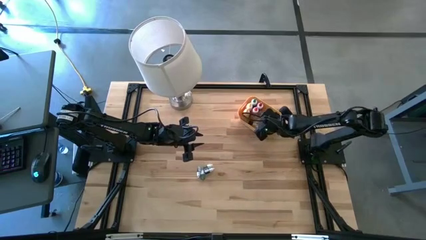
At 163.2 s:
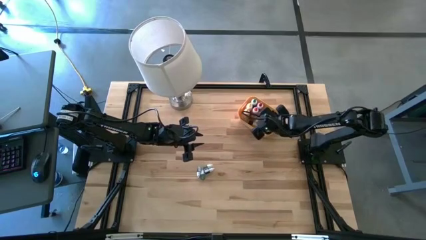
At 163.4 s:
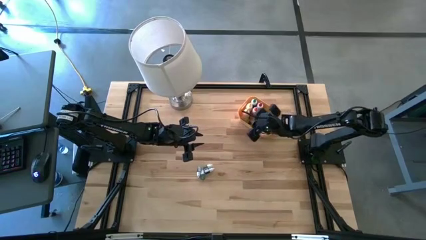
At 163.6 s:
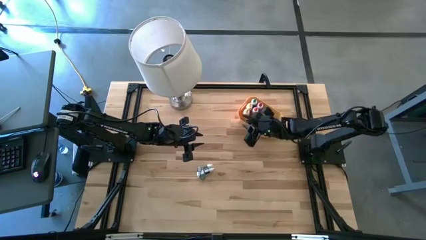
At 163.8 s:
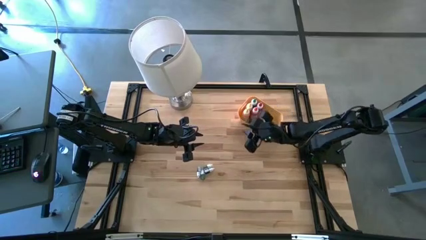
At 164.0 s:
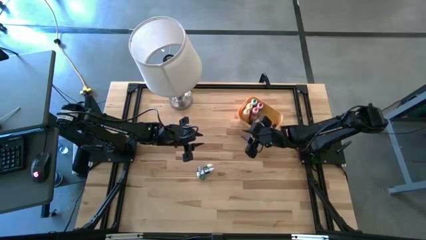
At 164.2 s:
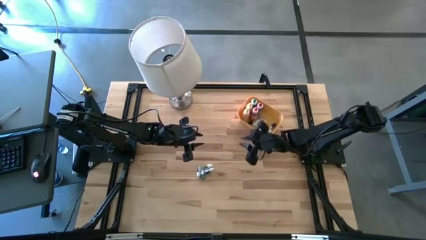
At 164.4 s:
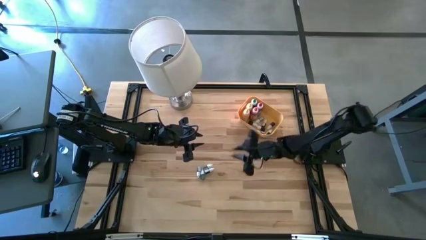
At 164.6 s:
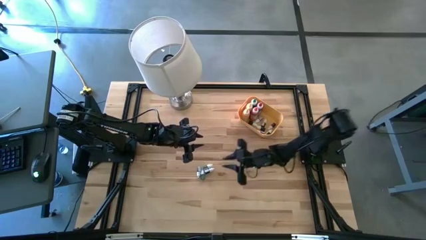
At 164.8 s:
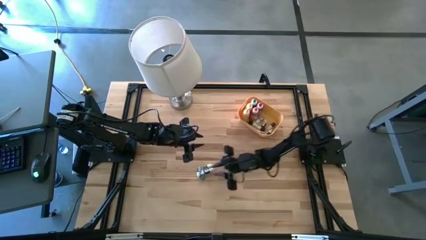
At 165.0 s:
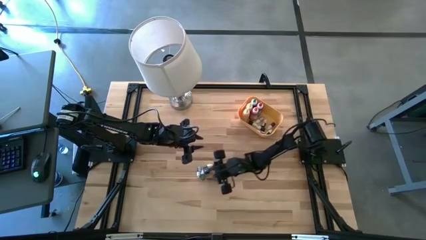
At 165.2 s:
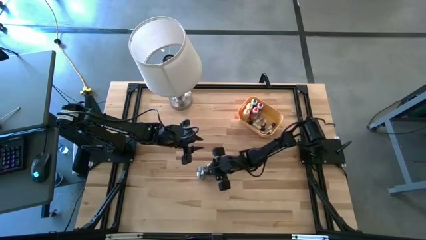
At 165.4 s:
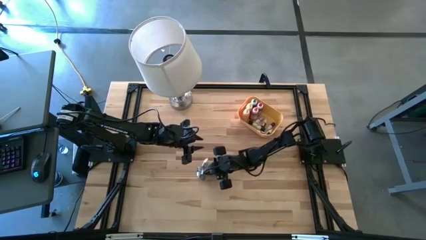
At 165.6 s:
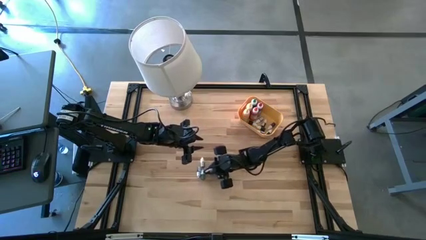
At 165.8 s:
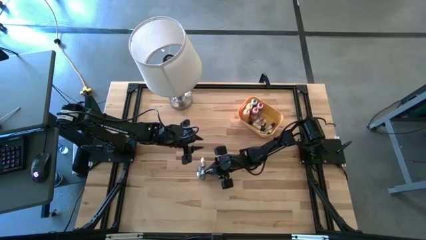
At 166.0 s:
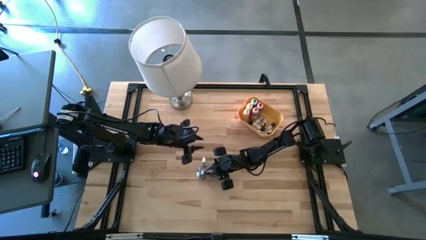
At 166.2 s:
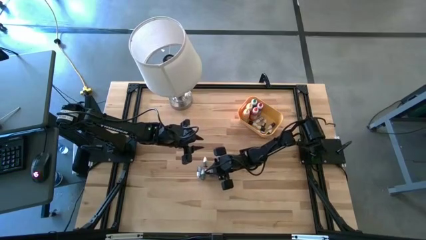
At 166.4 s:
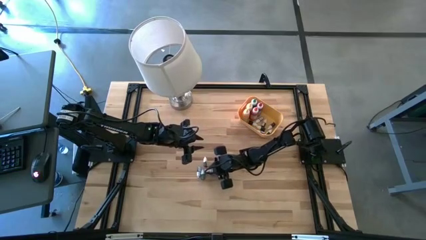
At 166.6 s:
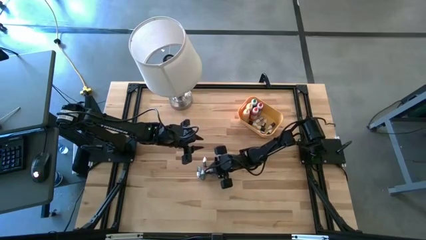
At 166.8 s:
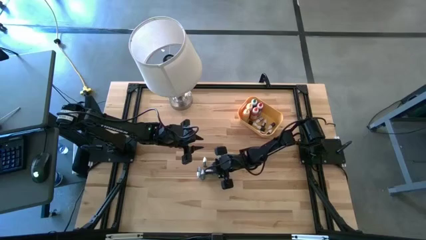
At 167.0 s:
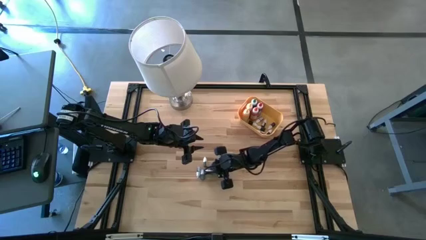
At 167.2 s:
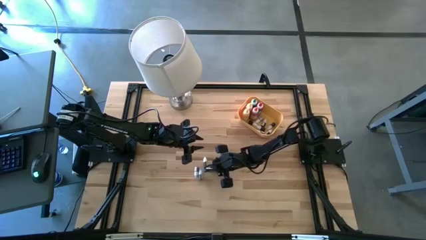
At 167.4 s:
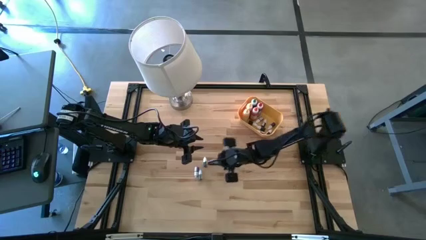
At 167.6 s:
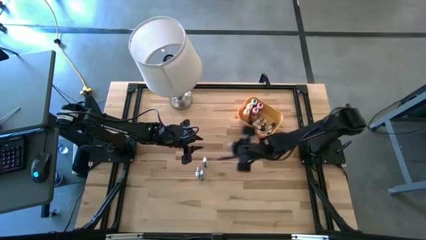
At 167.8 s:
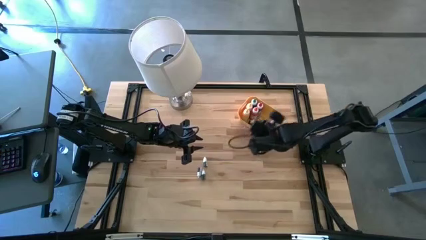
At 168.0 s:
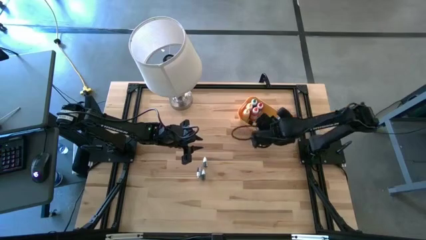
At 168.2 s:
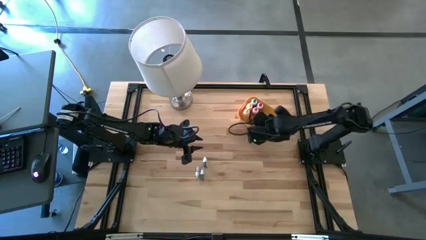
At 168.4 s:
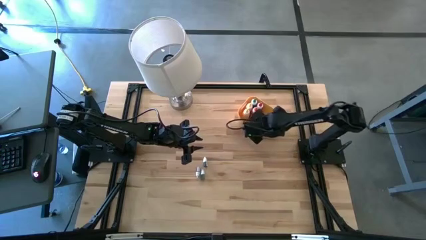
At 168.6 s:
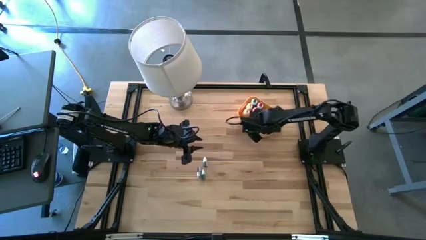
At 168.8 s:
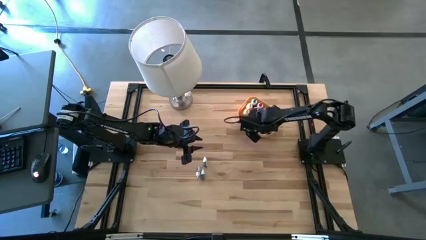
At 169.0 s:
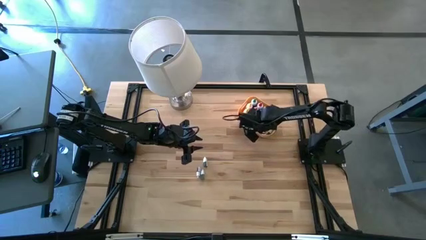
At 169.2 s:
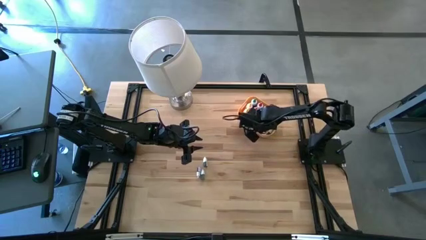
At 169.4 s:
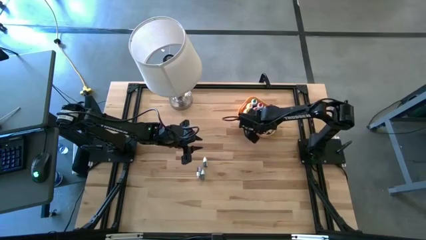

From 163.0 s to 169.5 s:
Task: Pick & Place food coloring
Put the small black food coloring bottle into the yellow bin

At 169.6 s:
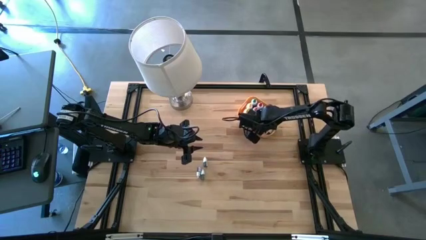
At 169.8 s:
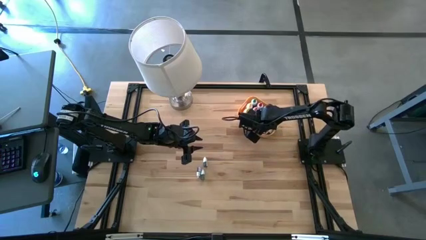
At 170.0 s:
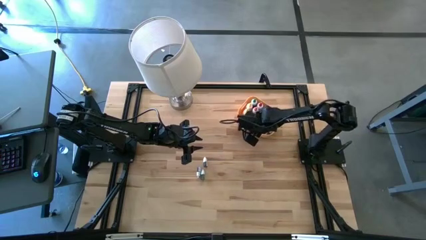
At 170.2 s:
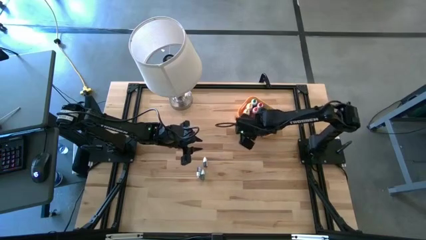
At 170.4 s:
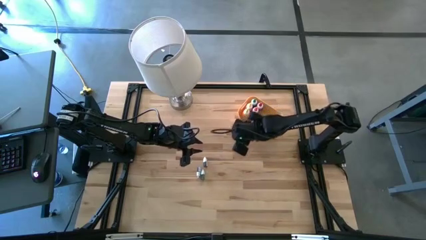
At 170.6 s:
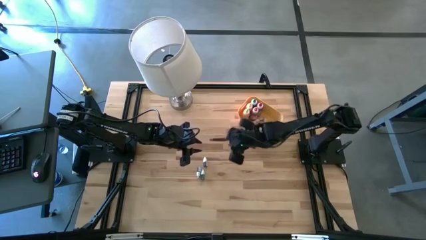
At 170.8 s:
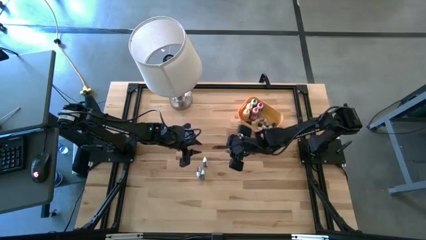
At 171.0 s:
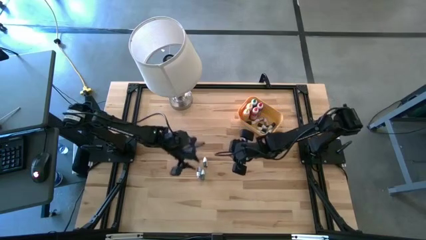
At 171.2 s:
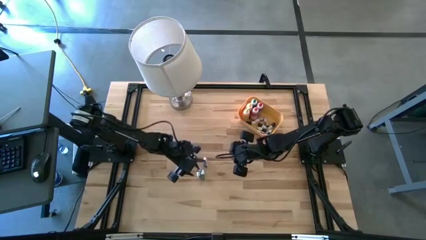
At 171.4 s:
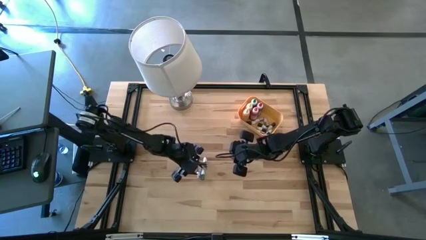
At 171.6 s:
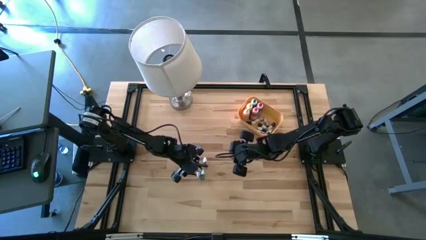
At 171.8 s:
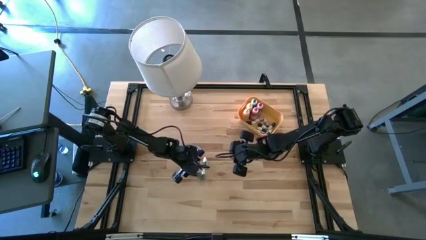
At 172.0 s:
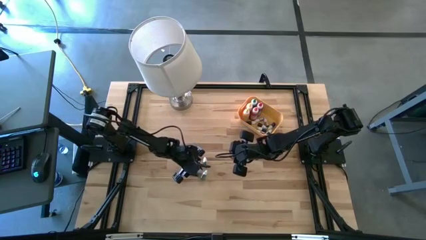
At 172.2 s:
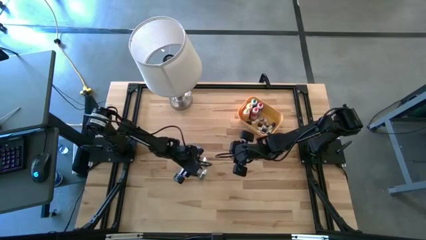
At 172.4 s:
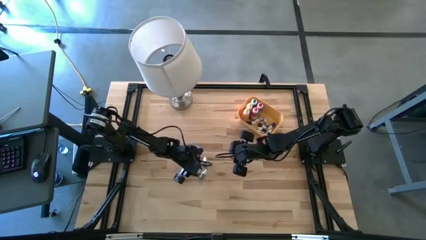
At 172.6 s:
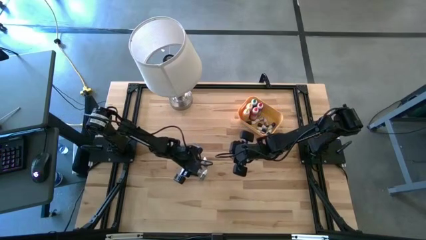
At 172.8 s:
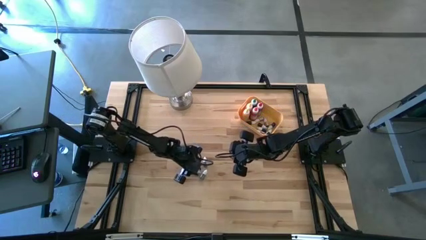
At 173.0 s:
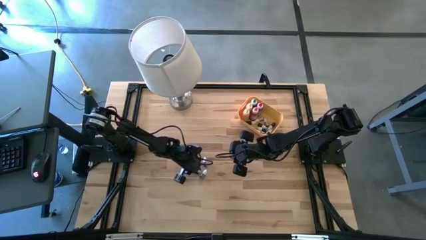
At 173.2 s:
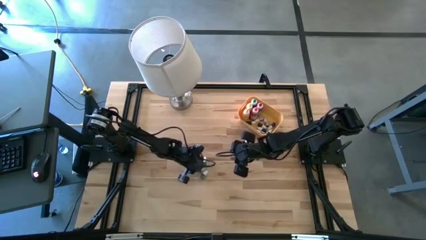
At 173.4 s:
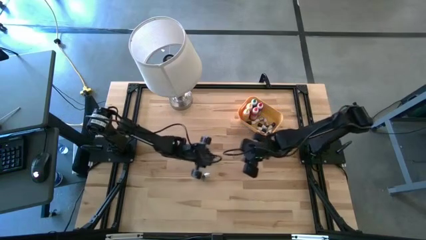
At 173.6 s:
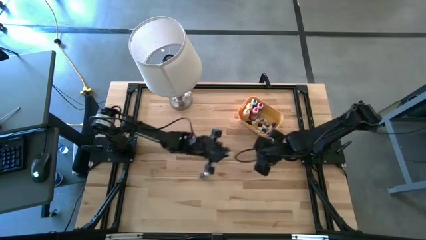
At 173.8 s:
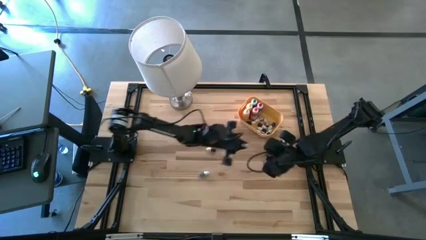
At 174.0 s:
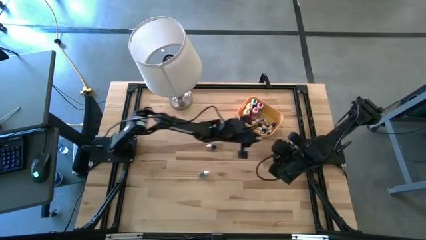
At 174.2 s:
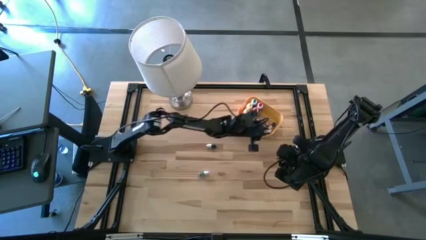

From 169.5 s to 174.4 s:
Put the small dark blue food coloring bottle into the yellow bin

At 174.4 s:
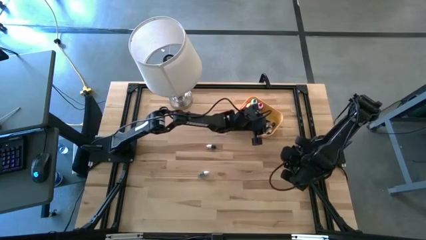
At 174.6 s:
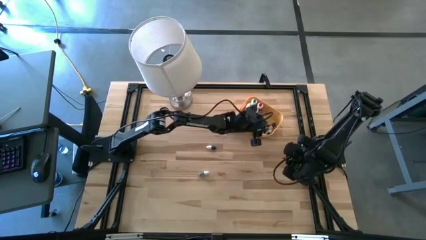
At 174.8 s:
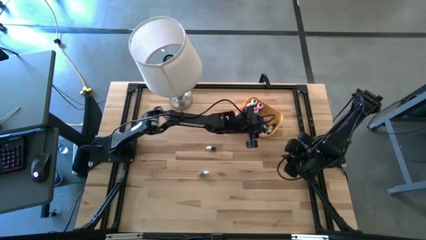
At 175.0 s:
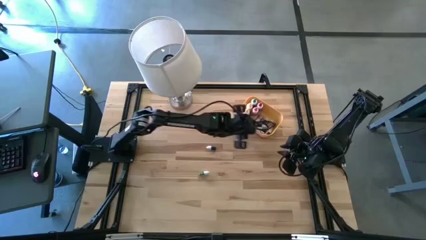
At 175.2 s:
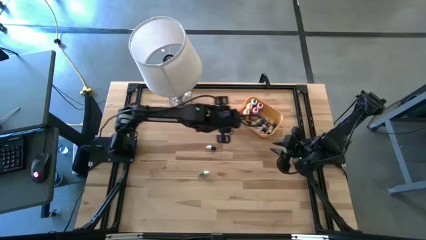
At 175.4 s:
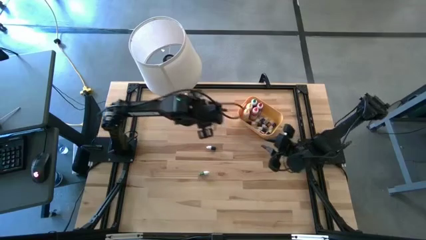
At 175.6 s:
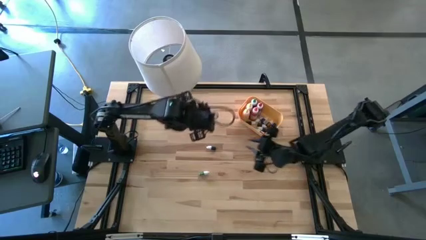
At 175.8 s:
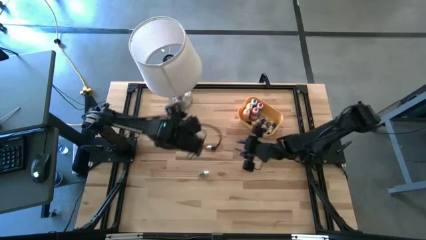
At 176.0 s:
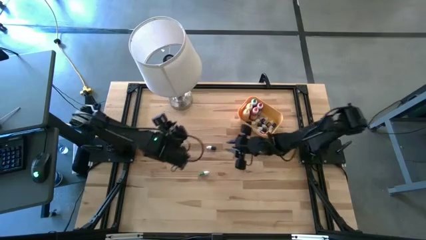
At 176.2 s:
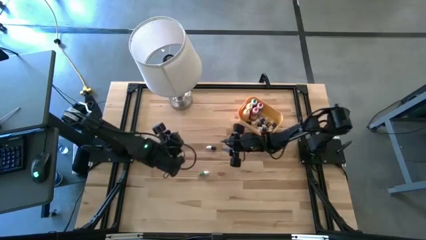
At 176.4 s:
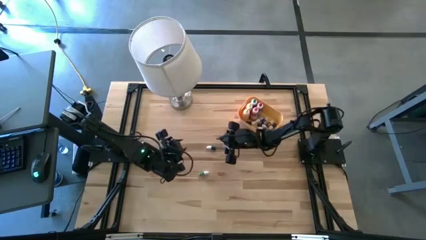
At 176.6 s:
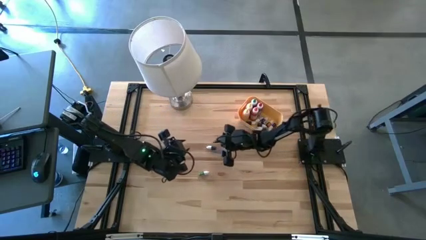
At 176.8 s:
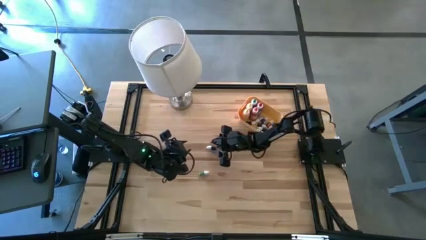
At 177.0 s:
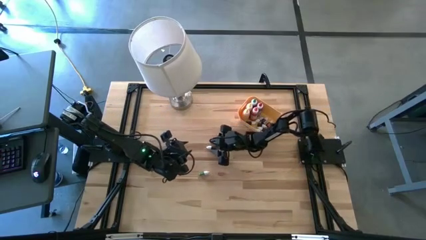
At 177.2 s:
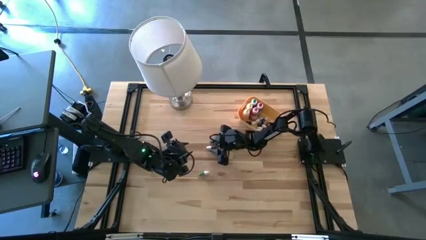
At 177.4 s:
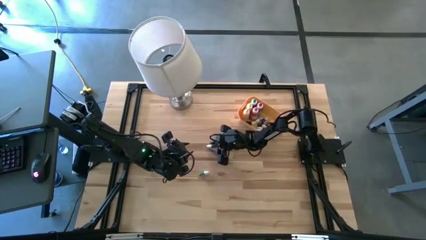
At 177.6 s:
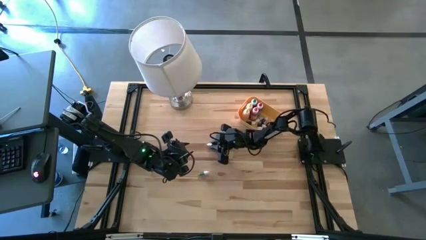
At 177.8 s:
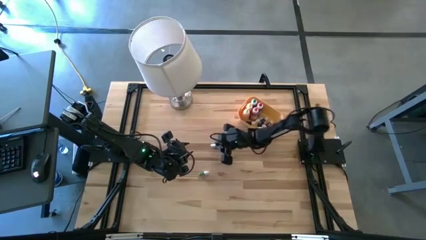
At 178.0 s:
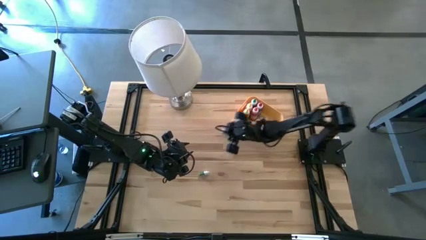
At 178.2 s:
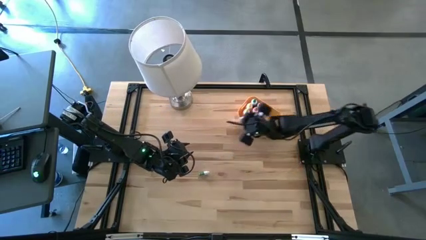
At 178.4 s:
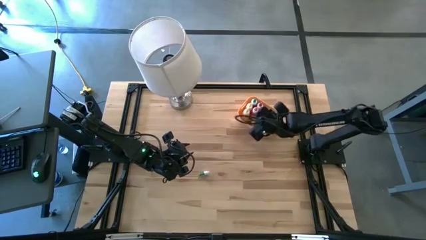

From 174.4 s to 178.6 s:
Put the small green food coloring bottle into the yellow bin
